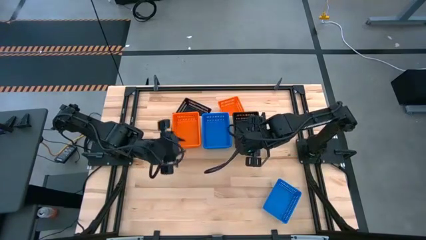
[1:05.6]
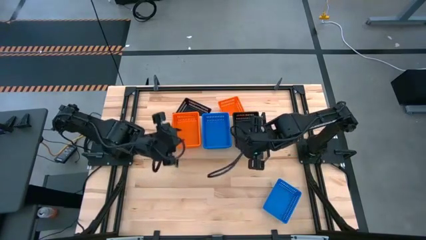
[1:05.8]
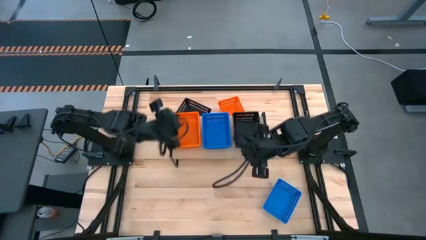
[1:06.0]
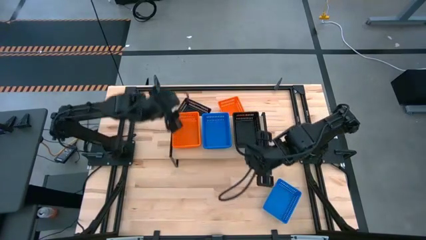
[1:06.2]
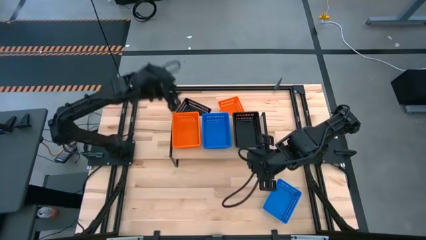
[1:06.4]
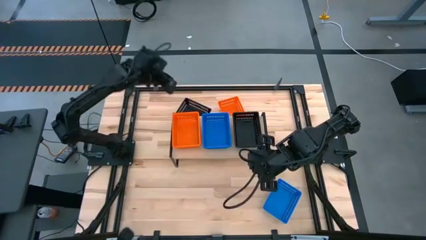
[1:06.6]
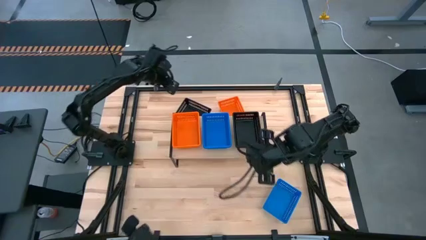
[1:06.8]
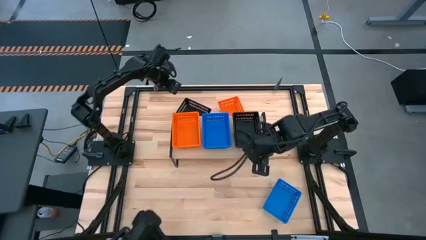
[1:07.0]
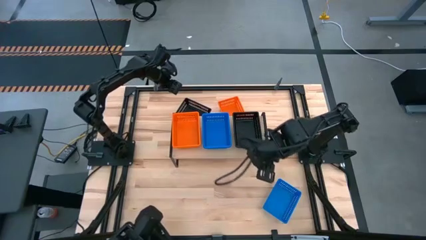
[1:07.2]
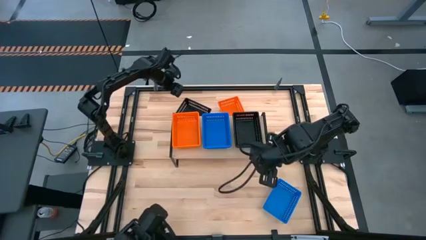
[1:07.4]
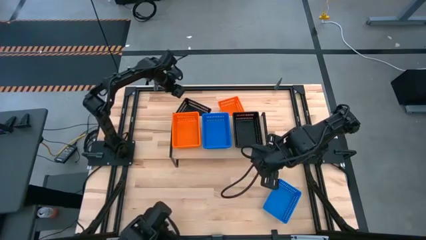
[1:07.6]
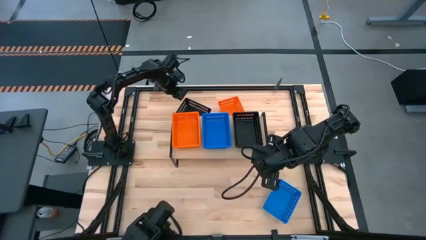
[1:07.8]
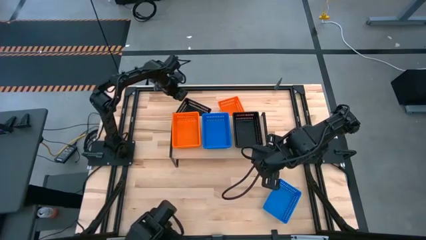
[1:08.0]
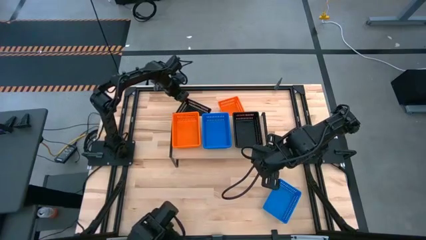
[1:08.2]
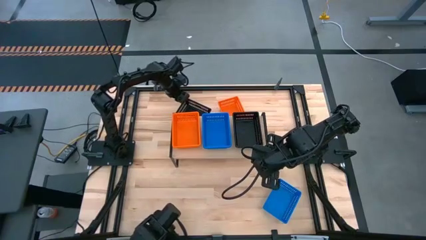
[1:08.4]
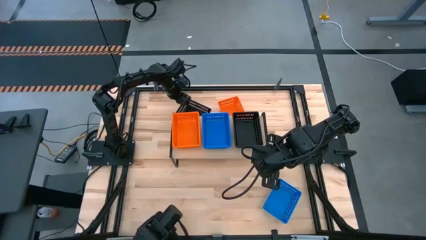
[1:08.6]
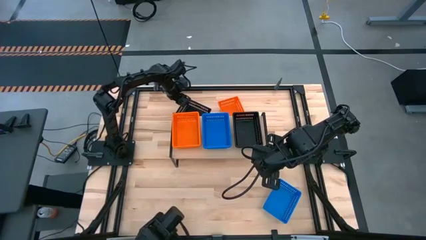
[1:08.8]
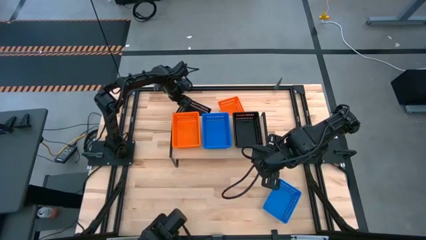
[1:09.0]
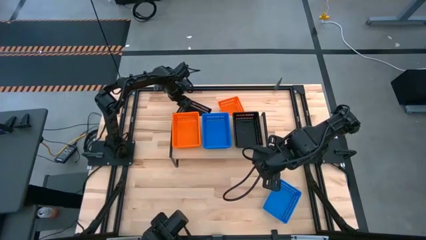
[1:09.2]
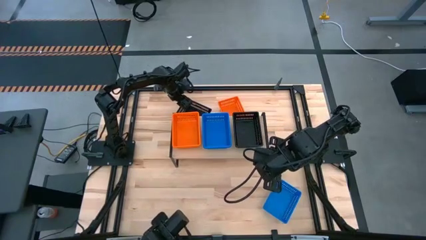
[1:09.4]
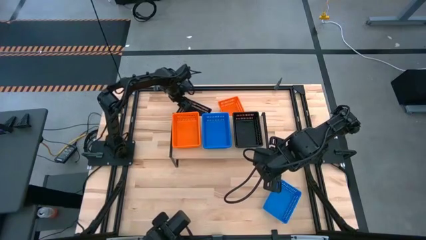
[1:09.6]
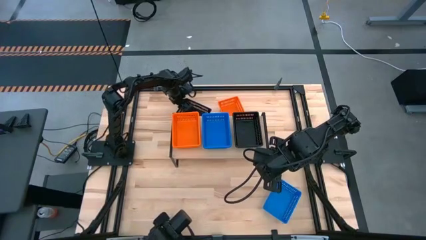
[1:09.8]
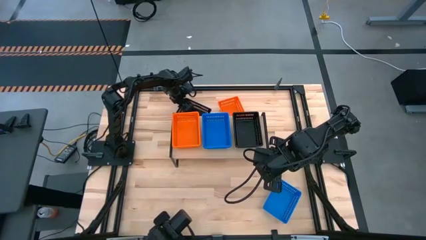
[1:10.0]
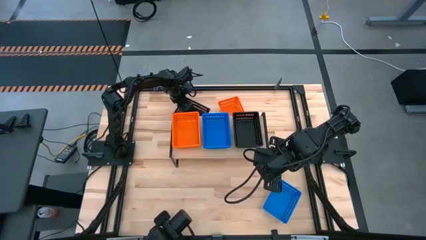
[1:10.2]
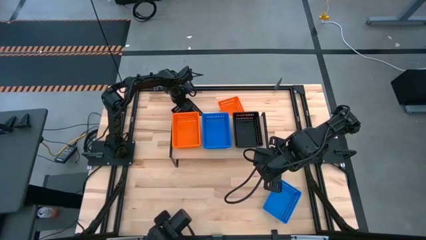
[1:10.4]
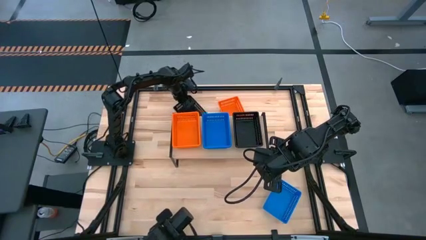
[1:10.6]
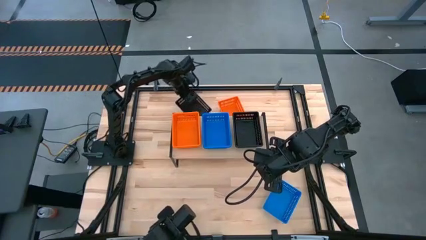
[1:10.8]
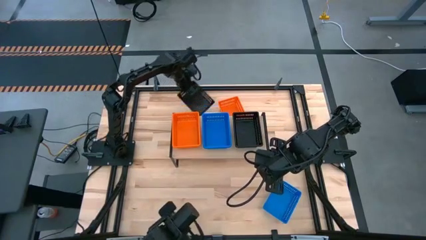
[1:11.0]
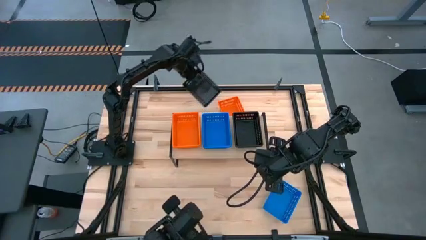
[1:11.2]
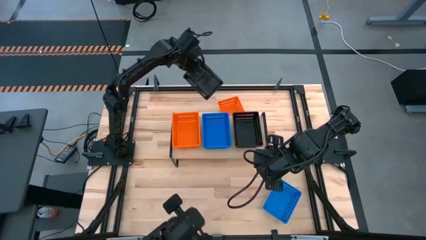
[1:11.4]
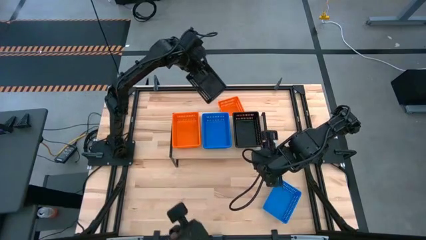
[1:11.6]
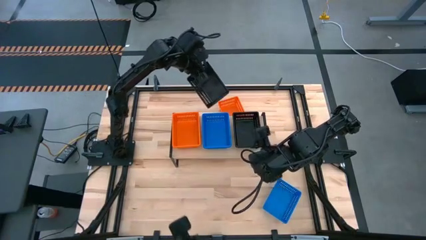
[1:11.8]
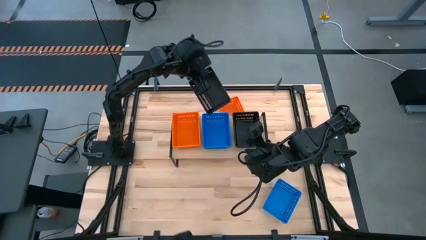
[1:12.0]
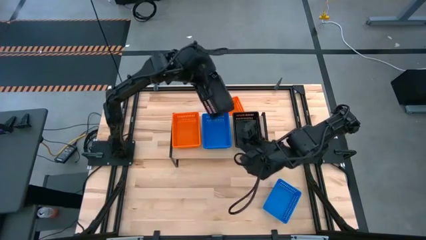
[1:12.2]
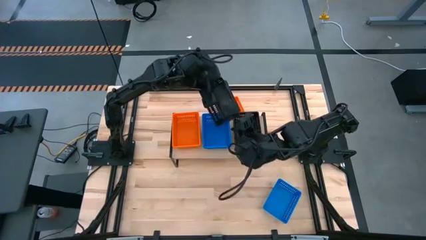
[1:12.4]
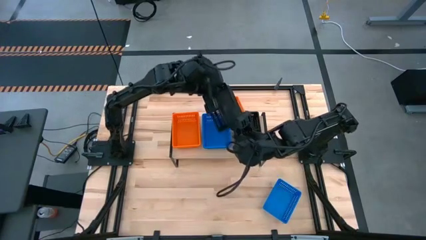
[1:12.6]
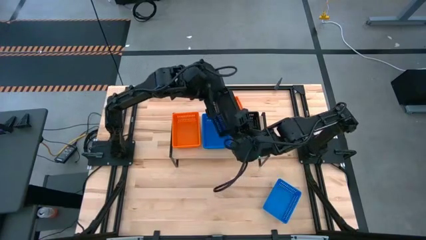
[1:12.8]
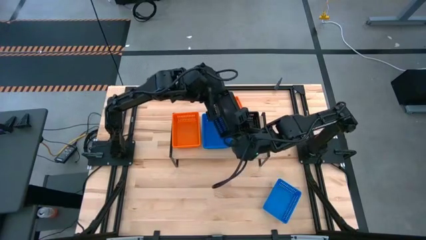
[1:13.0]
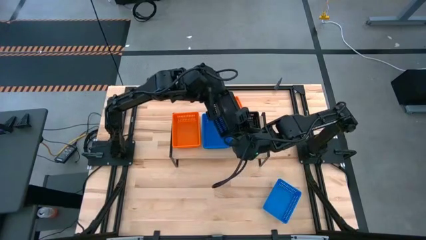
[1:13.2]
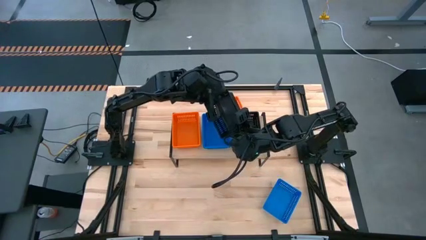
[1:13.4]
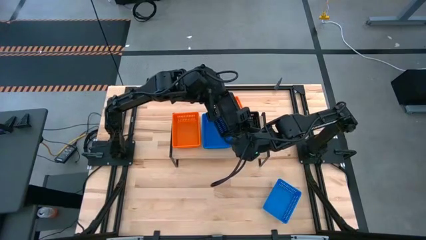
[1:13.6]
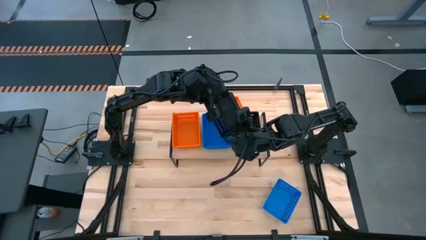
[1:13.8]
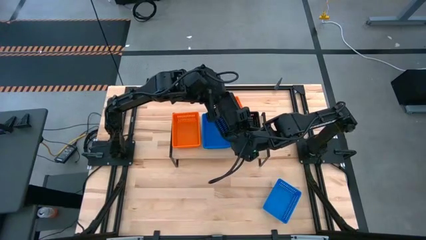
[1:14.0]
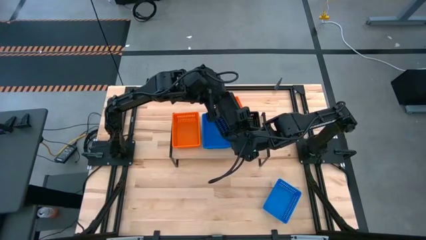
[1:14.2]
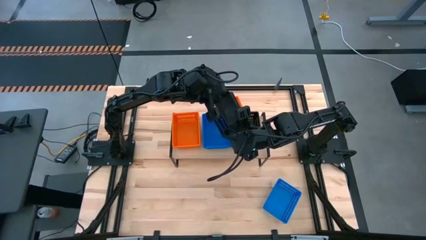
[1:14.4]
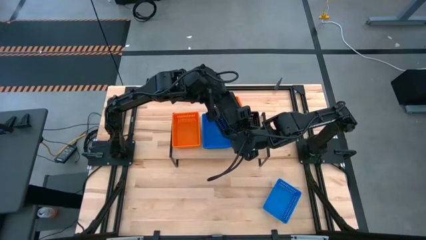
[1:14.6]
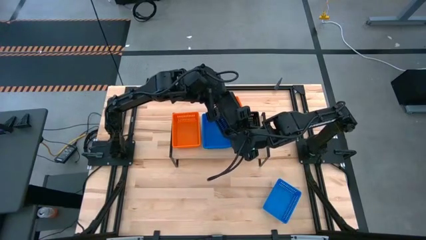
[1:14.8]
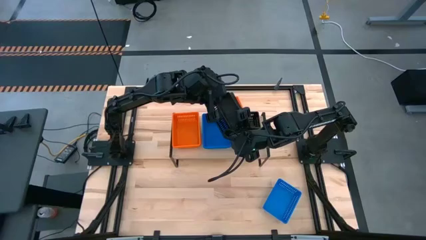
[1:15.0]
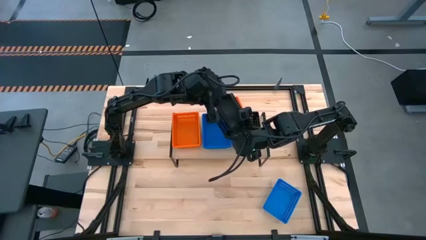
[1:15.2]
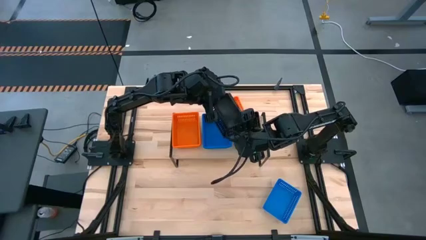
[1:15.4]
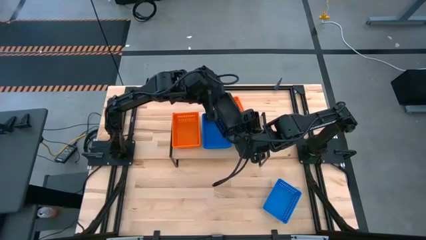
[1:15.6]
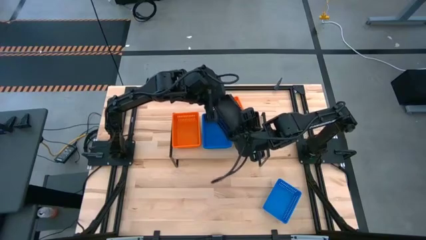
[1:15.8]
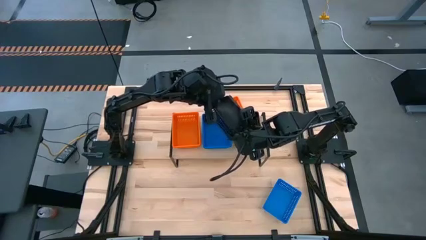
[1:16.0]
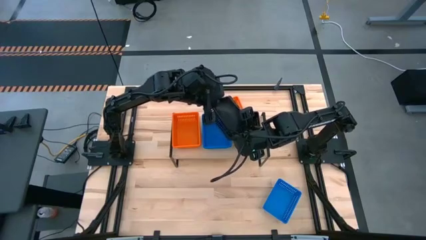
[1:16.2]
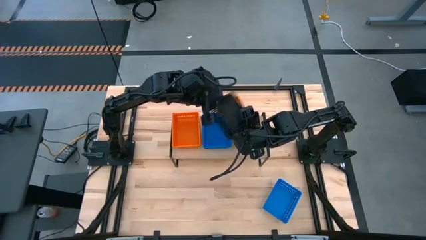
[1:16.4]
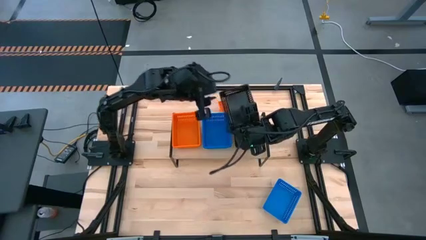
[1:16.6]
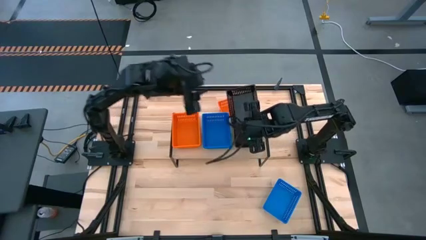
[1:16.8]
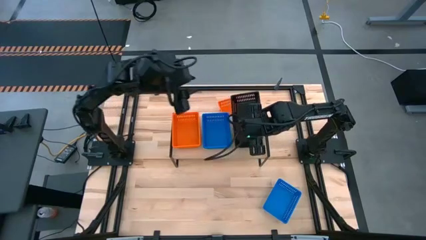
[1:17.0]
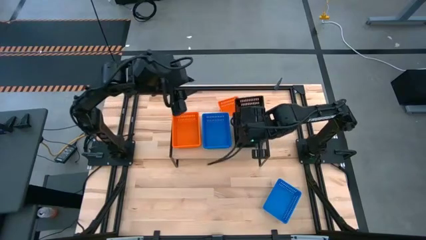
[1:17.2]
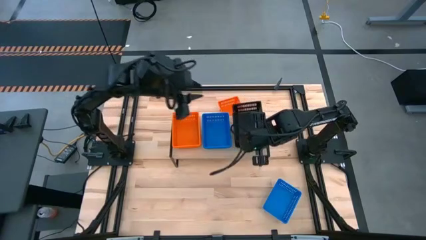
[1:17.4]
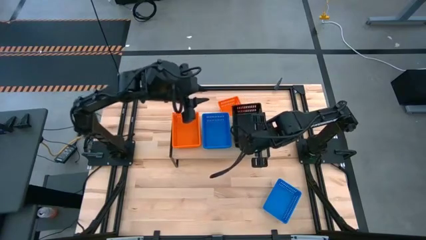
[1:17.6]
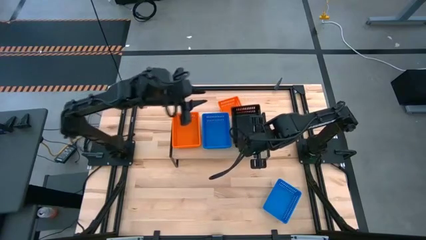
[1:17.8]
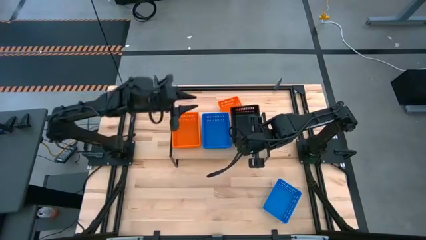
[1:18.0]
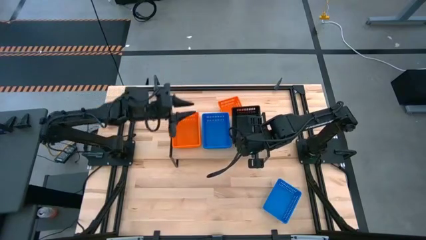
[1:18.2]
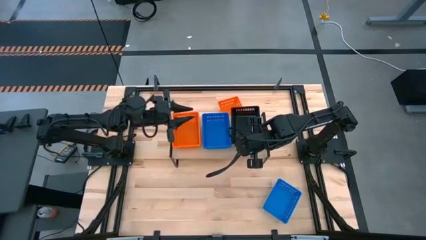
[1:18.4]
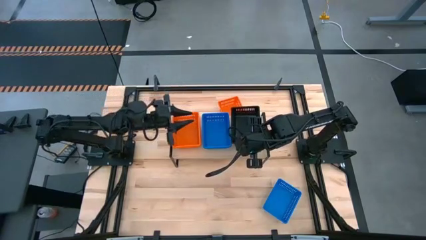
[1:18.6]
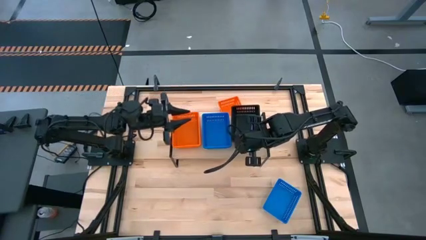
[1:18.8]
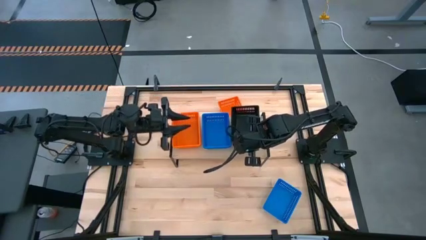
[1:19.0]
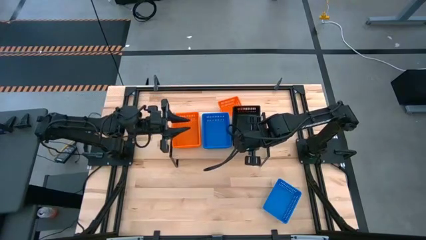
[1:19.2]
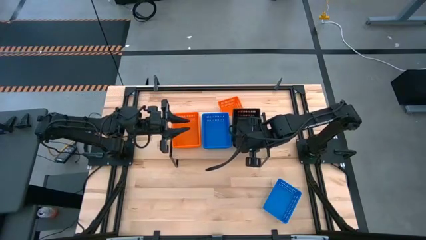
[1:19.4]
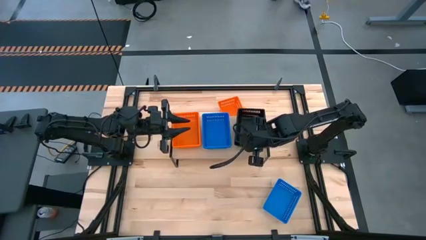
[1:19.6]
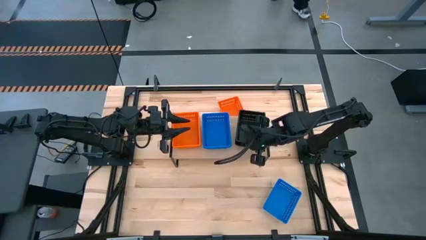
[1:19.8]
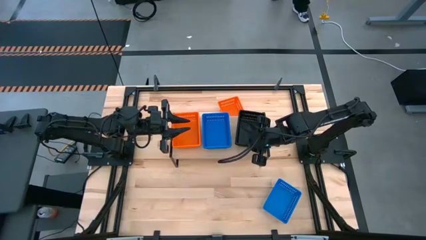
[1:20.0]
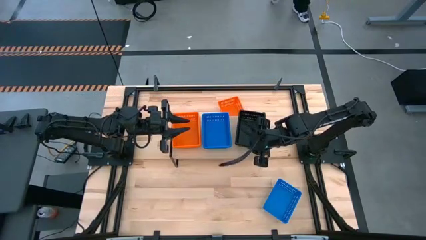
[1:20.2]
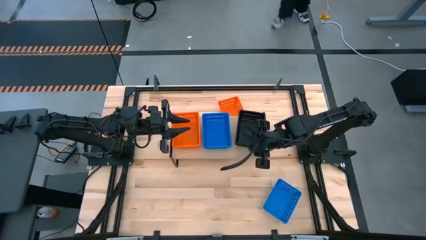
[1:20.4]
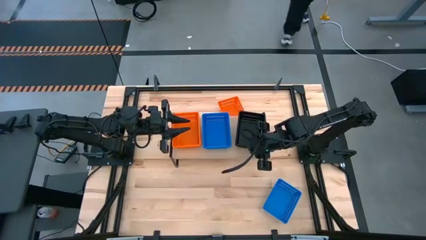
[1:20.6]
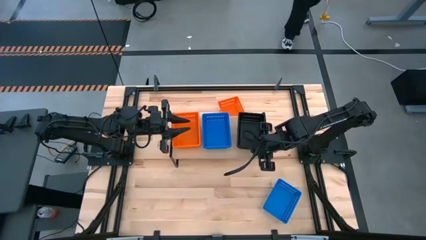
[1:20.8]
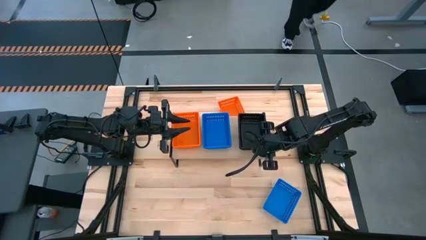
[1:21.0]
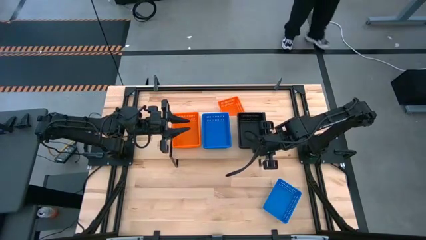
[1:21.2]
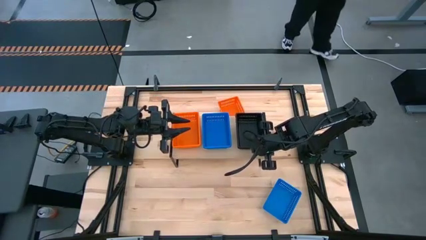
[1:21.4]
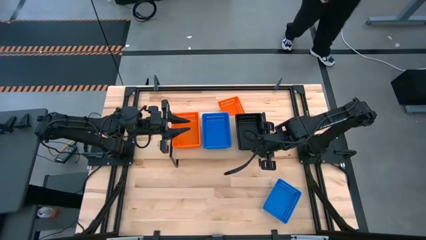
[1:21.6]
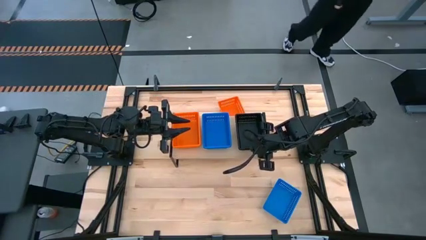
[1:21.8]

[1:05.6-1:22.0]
Task: Stack baskets on shelf by color
Stack the black bin on top of the black bin on the shelf
